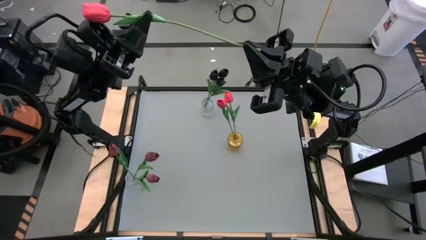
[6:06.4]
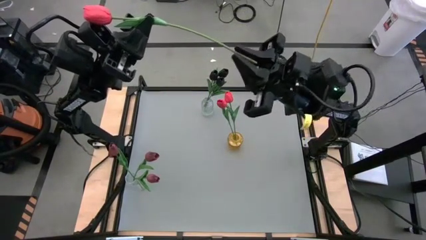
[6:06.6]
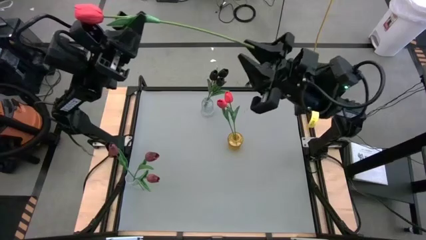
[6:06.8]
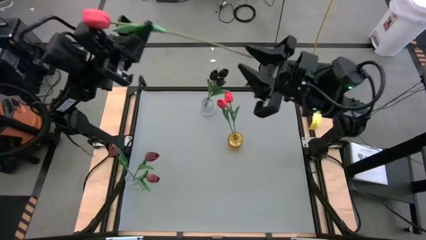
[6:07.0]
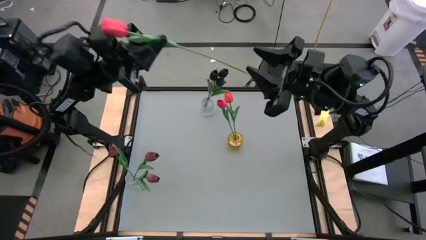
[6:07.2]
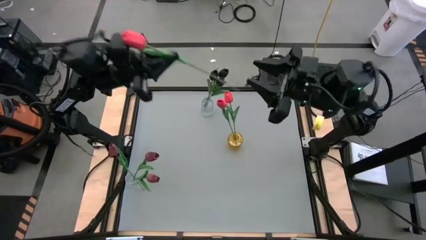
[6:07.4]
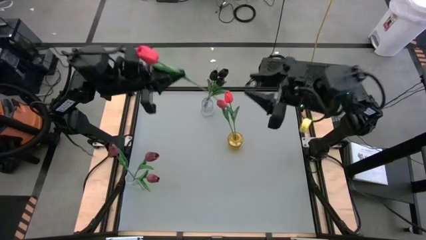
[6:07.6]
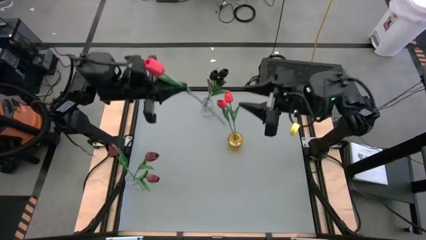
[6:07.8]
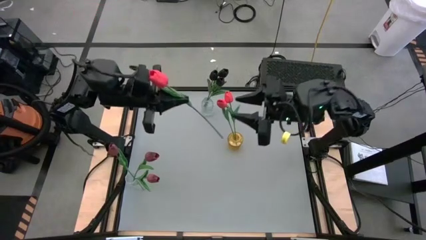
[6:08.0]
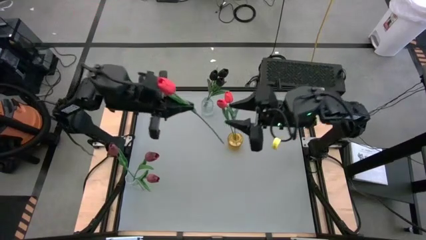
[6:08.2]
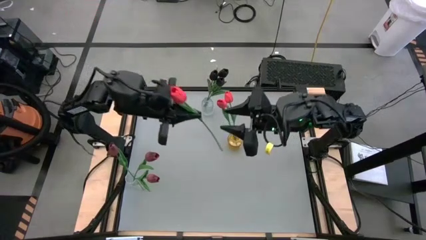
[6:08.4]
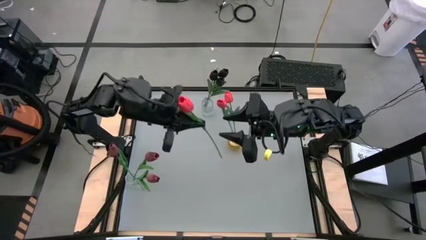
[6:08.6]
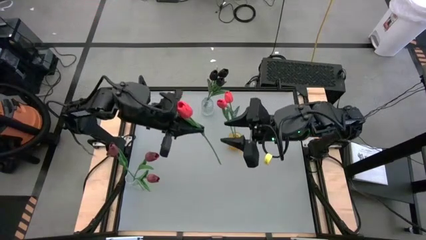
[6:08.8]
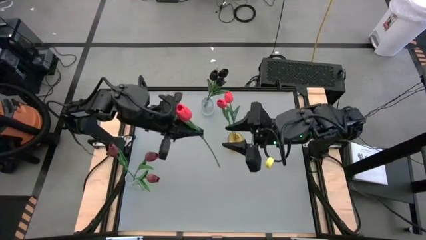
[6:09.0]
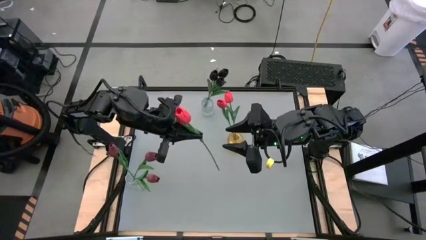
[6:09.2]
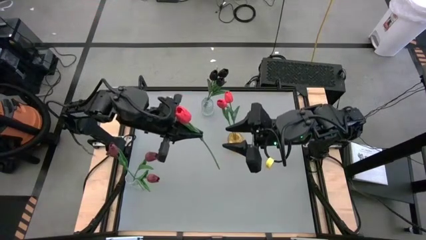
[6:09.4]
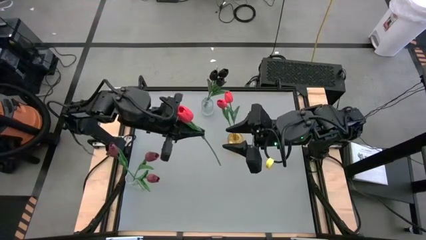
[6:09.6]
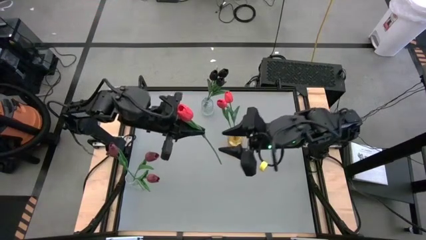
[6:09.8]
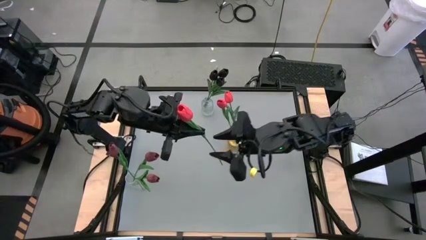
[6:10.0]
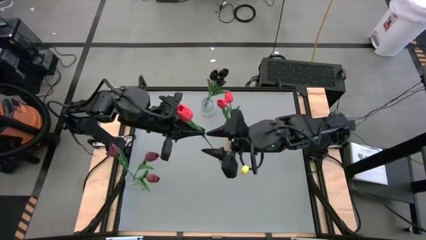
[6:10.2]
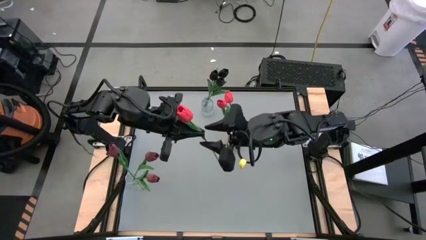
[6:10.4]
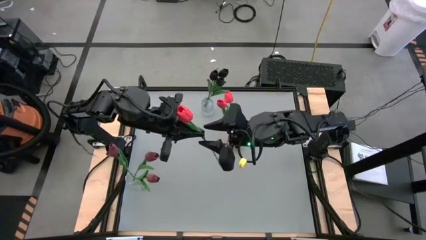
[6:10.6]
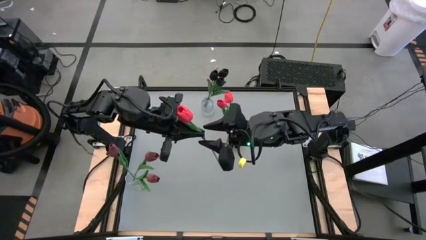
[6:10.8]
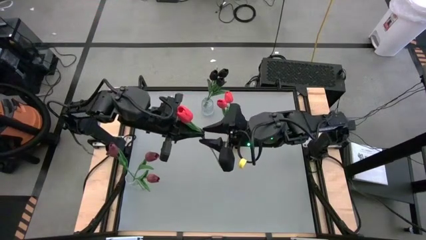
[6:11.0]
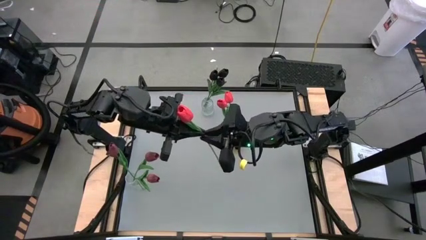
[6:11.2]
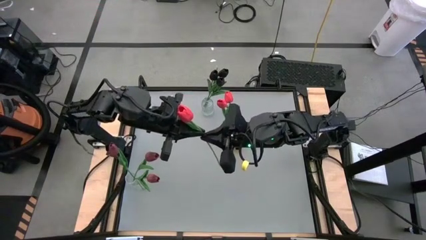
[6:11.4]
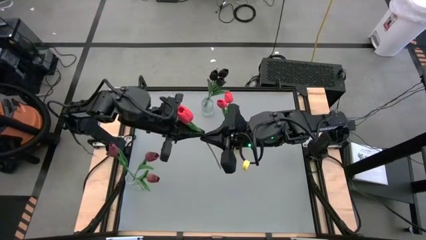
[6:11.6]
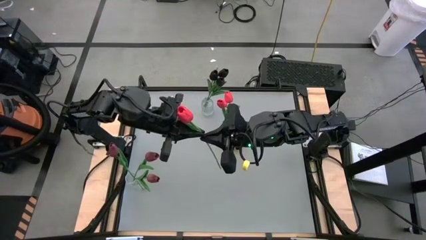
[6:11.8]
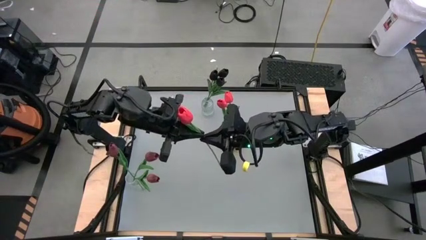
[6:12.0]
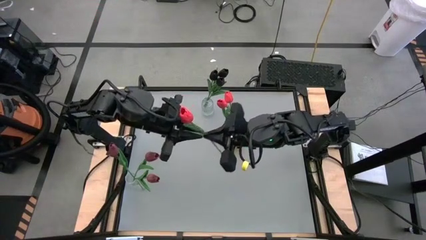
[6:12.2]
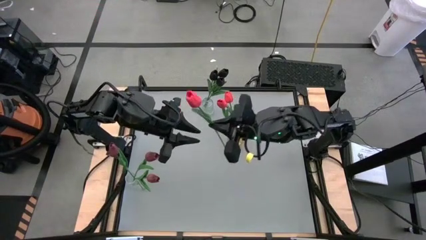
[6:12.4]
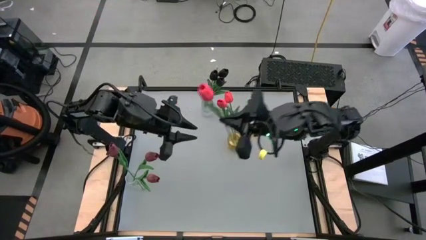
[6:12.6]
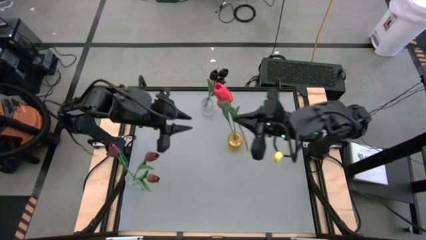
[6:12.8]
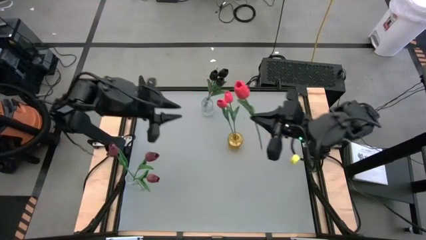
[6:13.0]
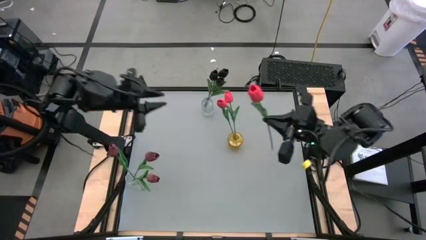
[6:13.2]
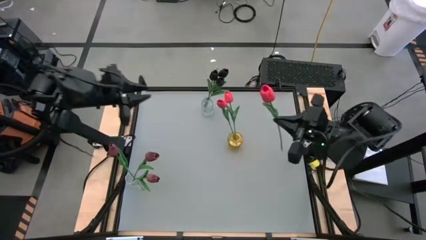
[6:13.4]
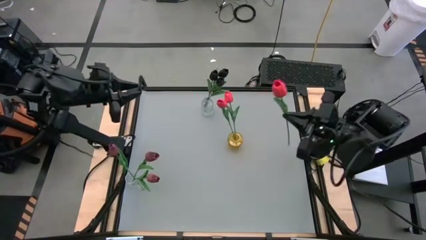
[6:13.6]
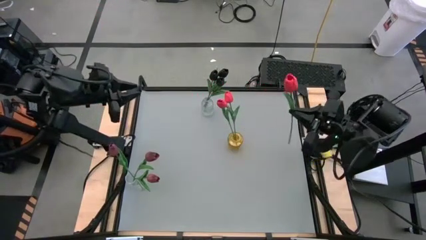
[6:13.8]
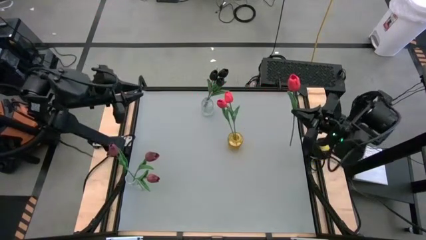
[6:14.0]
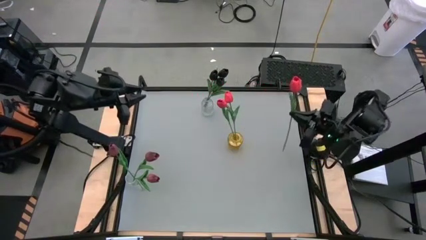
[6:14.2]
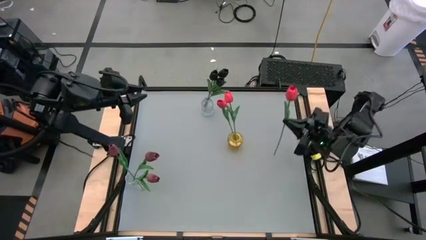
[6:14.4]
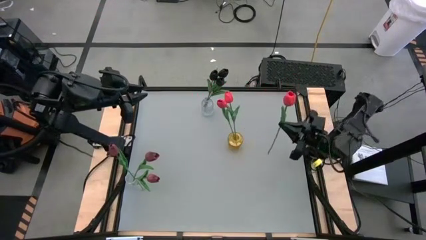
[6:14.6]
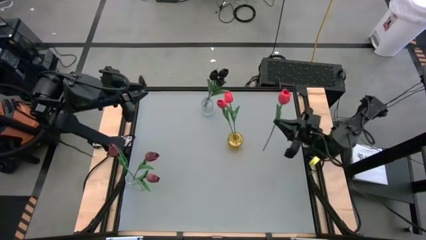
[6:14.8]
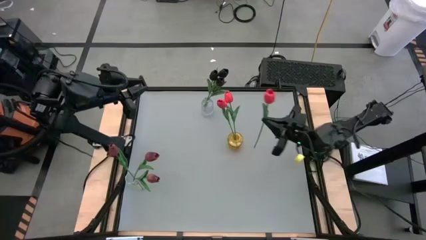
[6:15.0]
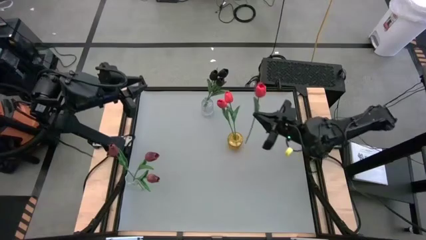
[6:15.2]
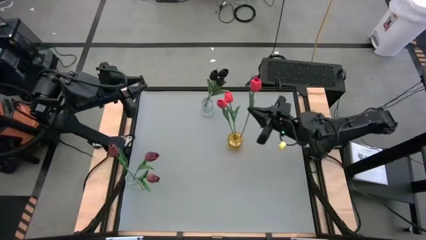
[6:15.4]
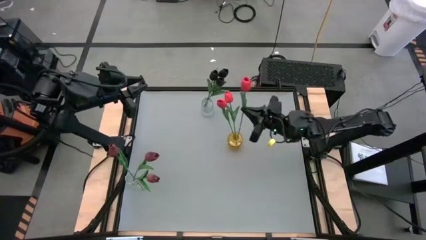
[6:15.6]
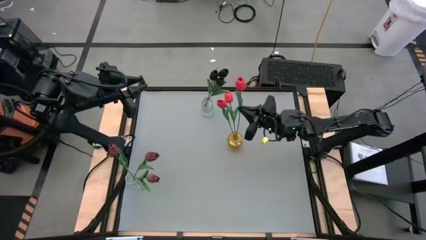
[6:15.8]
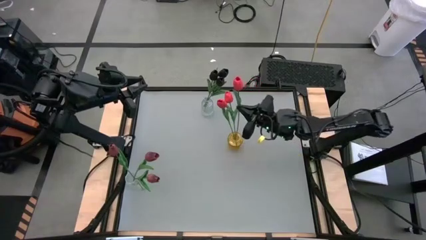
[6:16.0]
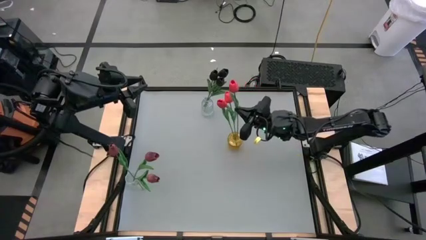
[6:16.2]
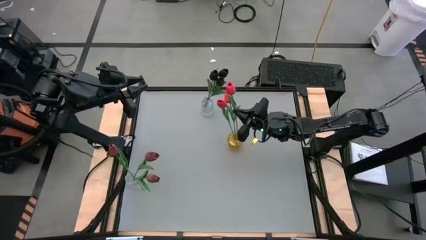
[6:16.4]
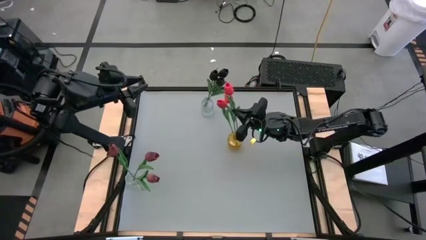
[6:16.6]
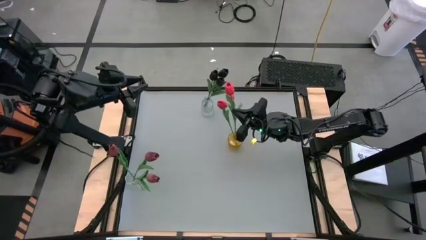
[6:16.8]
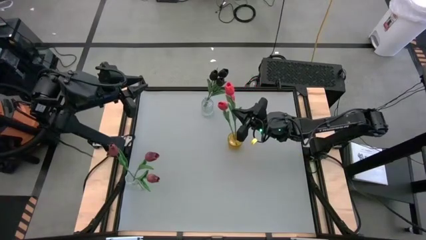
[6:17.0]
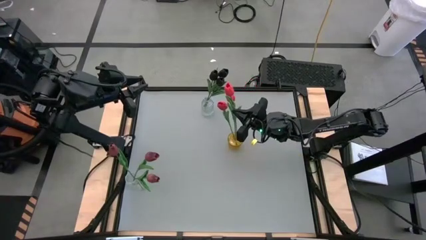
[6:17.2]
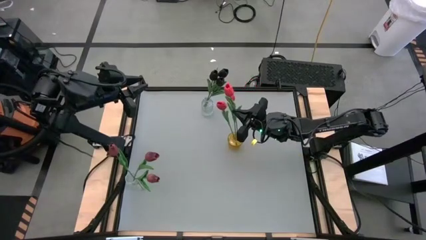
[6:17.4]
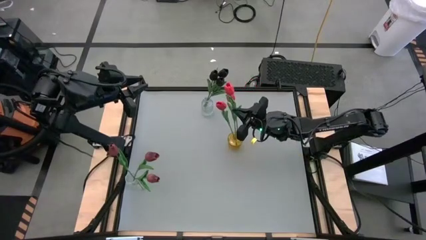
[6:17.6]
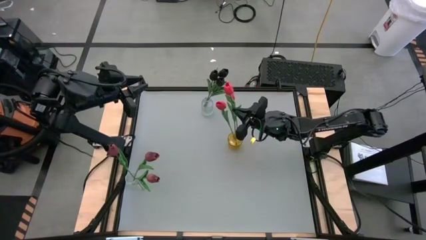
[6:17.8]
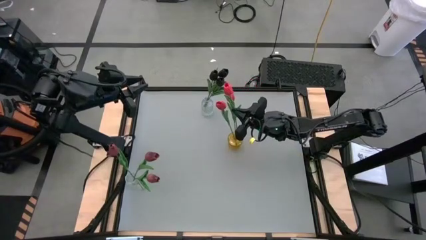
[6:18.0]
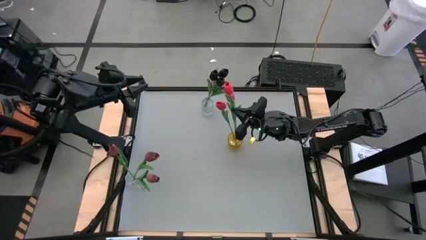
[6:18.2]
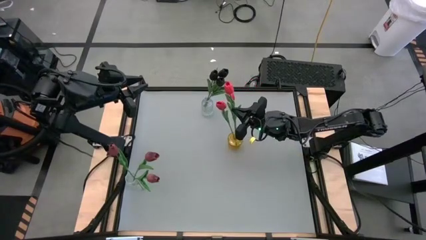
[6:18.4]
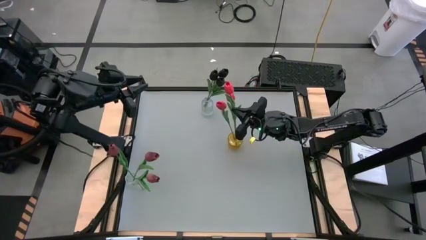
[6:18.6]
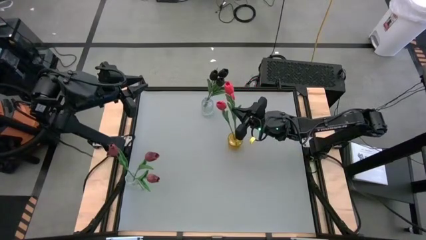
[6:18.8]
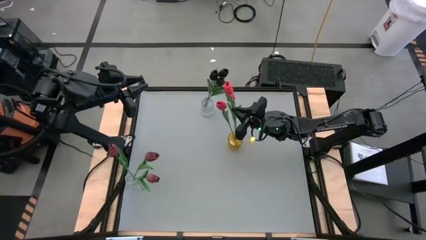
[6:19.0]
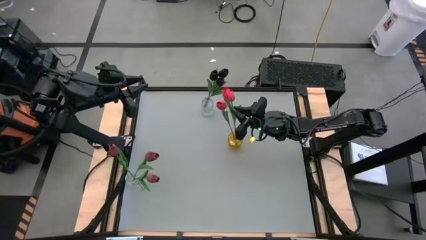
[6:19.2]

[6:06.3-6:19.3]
Task: Sort flowers into vase by color
Put the pink tulip into the yellow vase

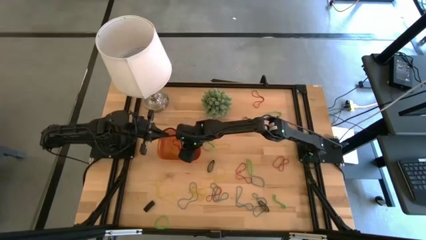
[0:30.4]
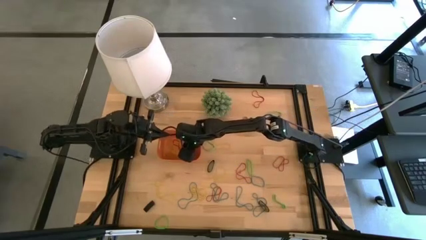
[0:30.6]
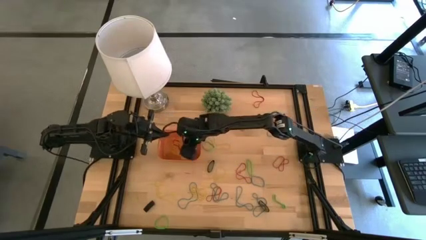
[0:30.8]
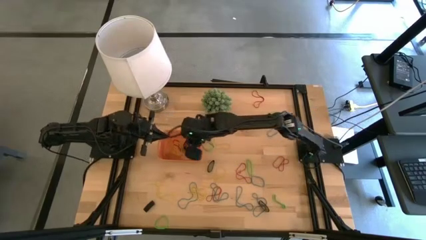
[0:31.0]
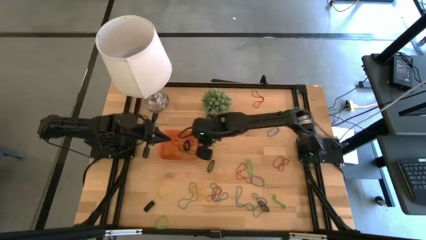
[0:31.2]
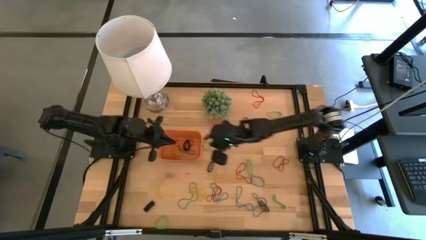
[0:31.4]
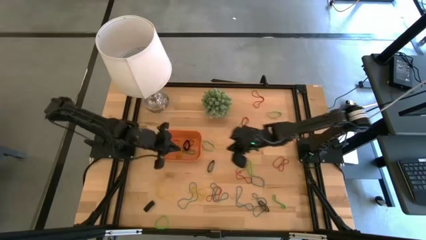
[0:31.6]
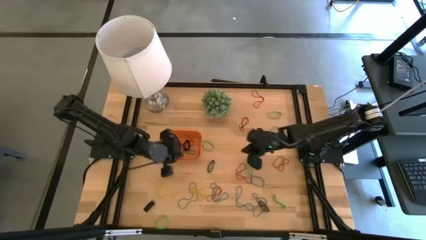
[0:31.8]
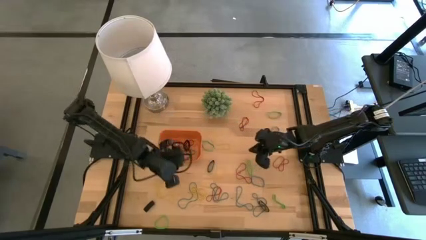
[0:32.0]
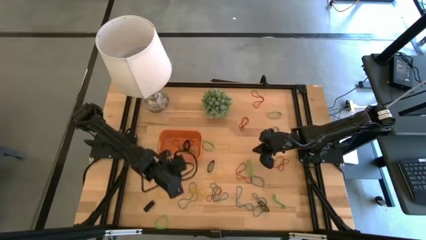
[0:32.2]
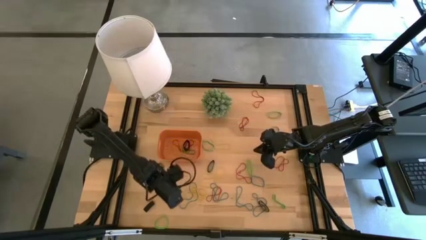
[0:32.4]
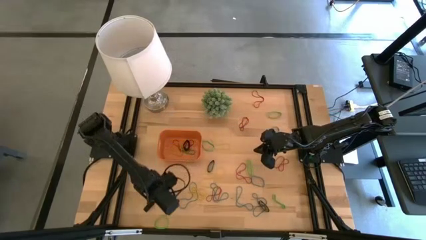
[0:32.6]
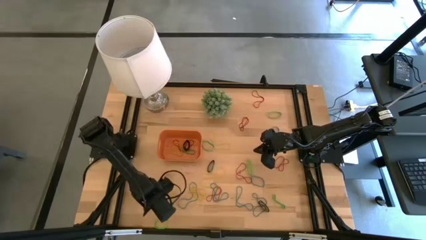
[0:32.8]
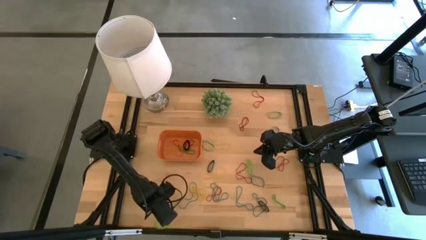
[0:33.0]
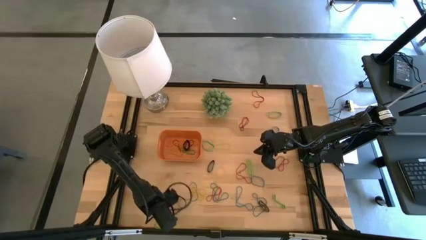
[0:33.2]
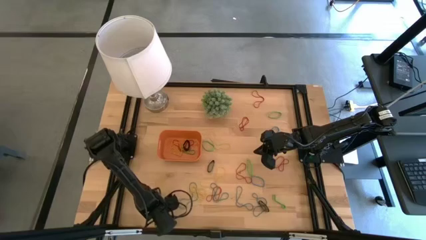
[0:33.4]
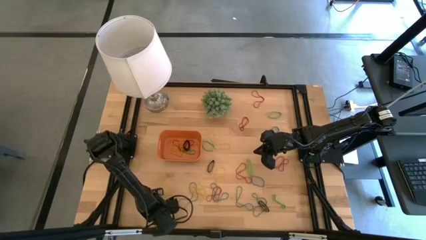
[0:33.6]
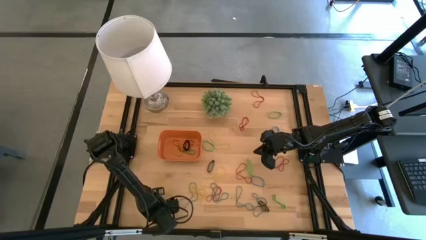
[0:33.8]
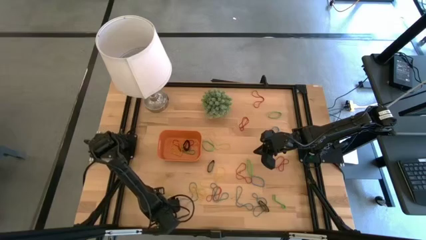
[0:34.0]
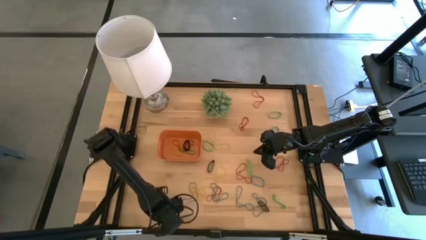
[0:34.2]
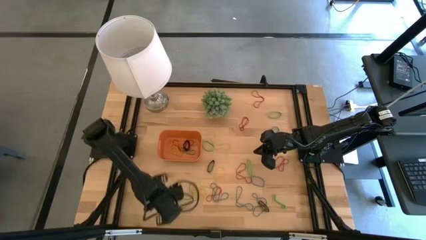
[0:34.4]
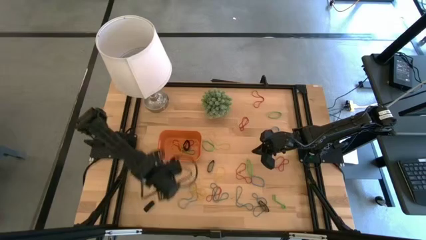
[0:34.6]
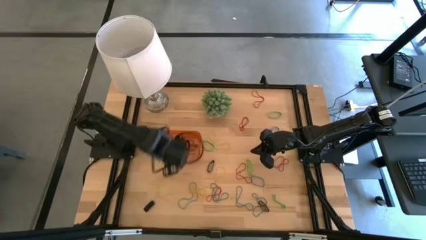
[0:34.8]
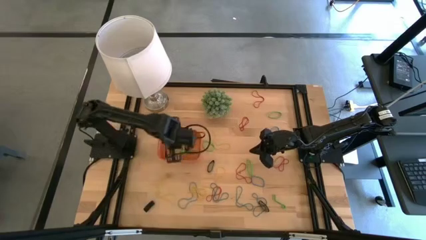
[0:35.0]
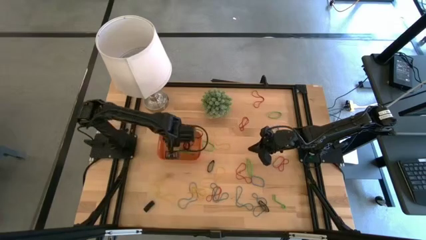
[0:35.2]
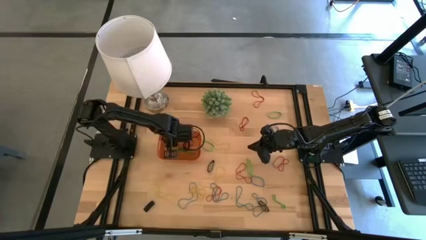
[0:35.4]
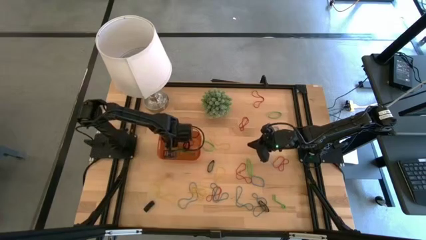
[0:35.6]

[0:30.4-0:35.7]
Task: Pick and place rubber bands into bin
Put the green rubber band into the orange bin
